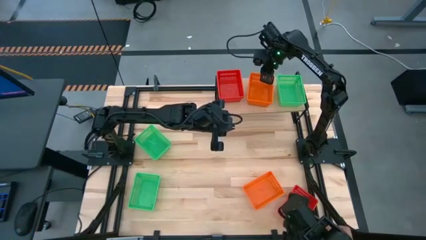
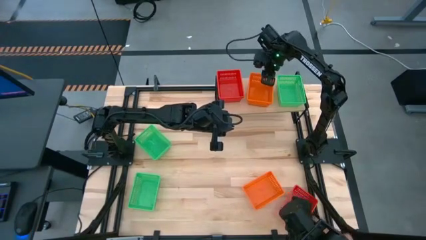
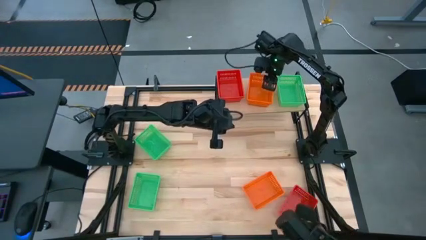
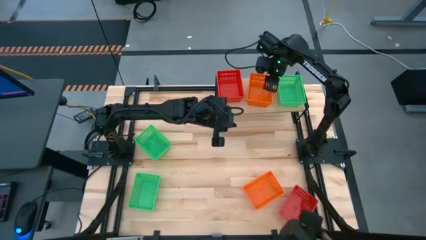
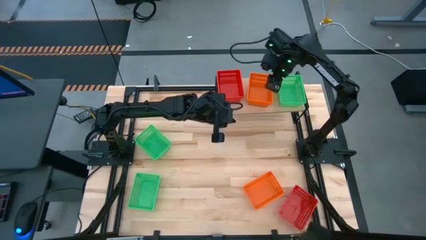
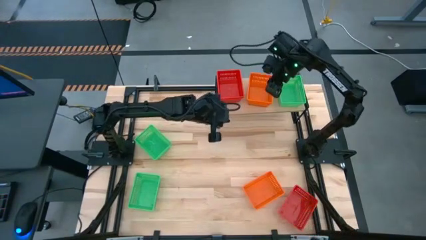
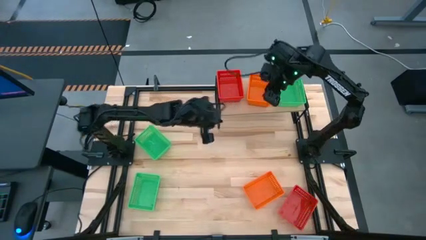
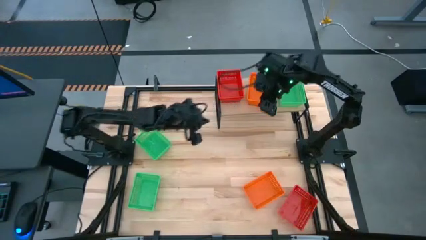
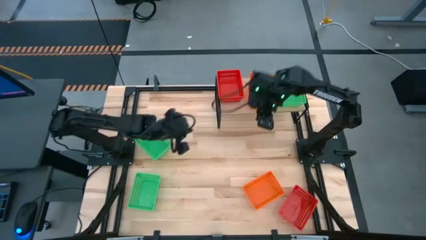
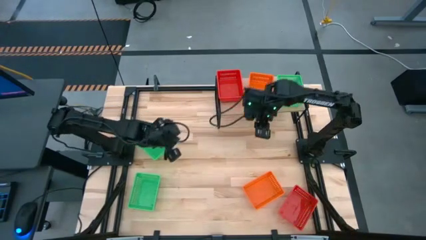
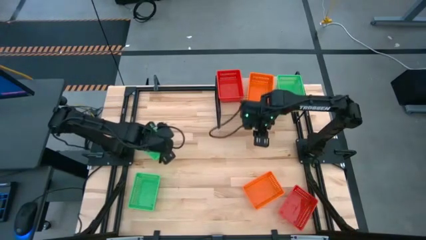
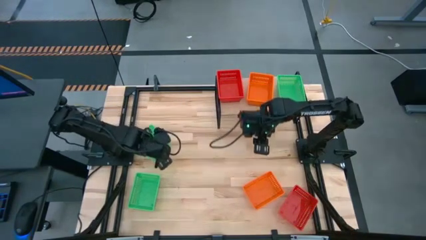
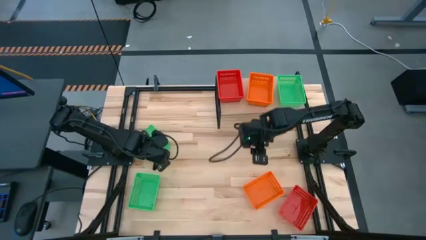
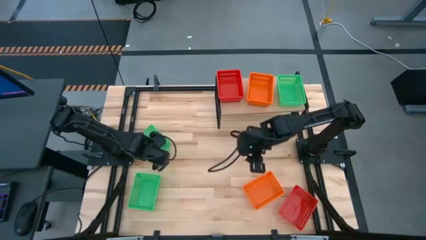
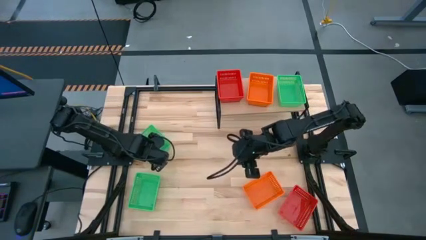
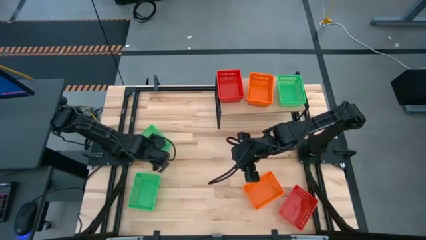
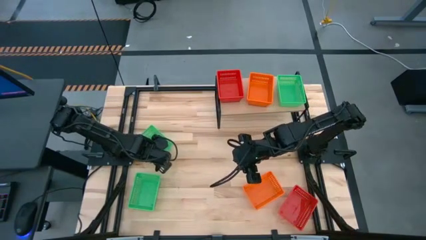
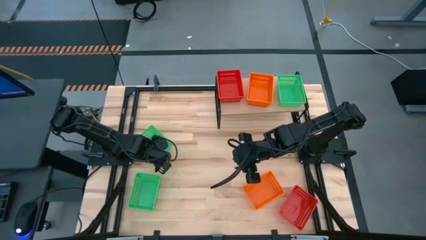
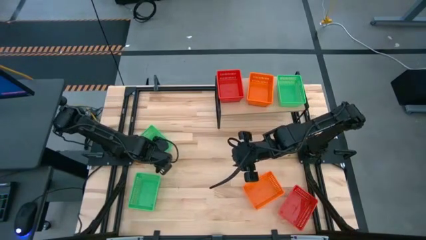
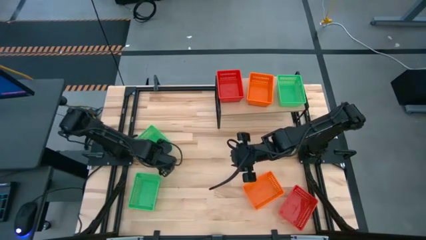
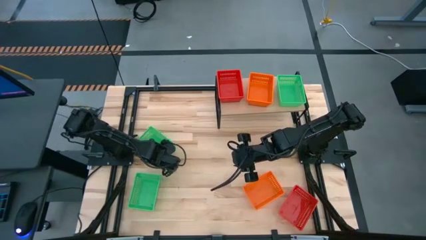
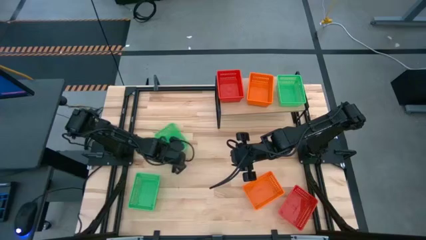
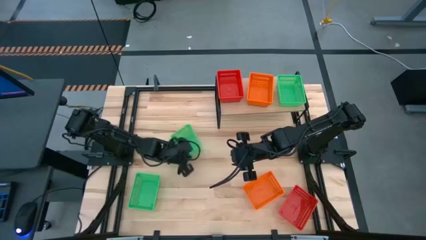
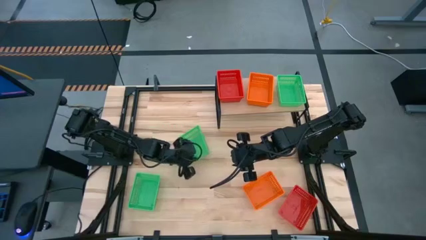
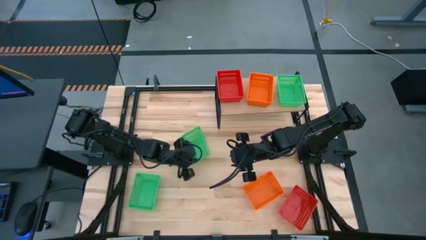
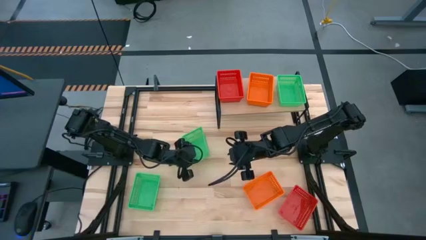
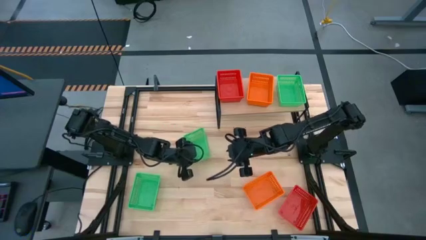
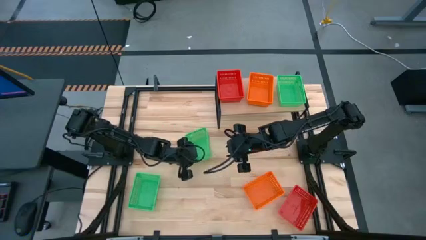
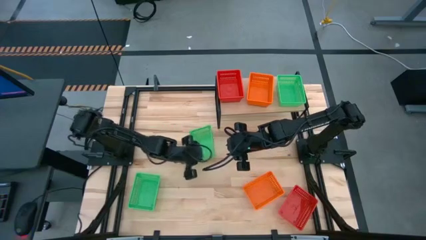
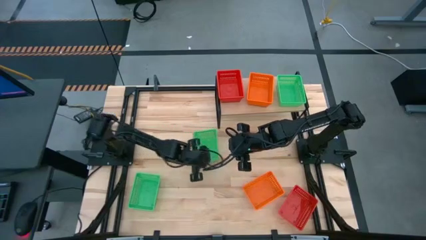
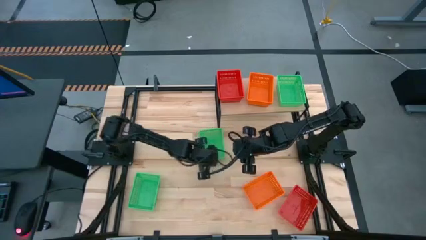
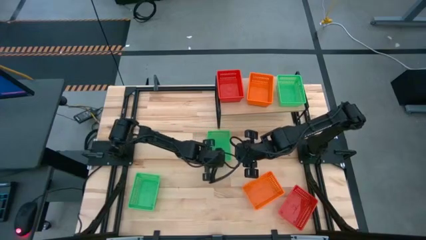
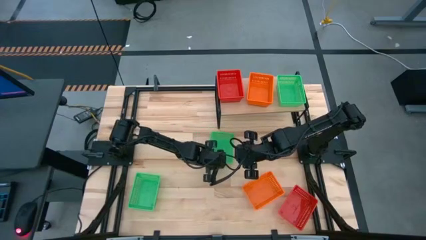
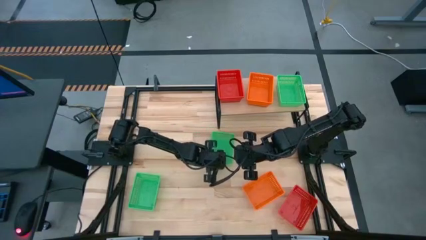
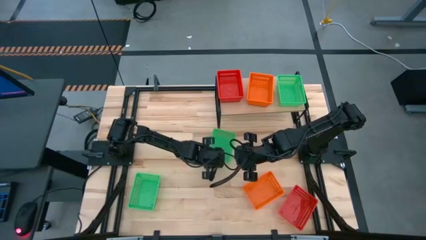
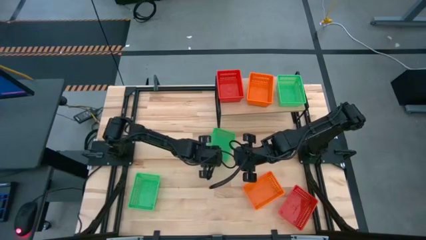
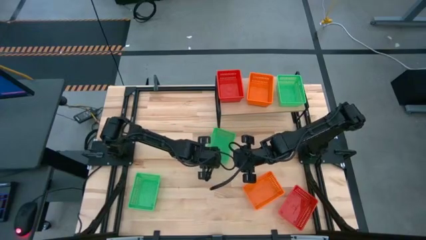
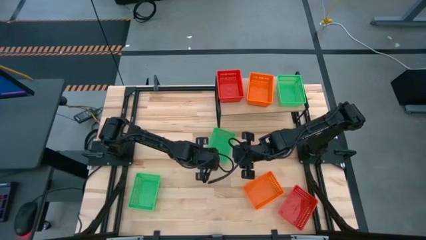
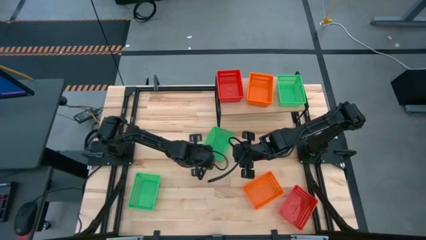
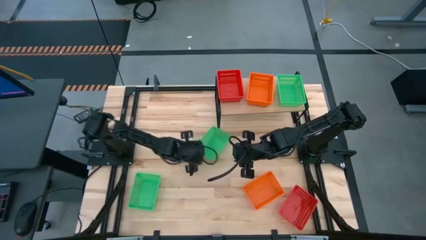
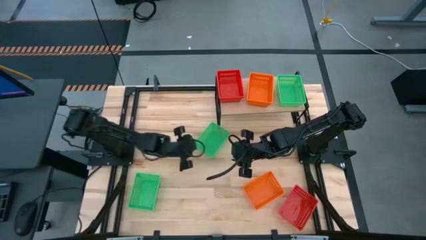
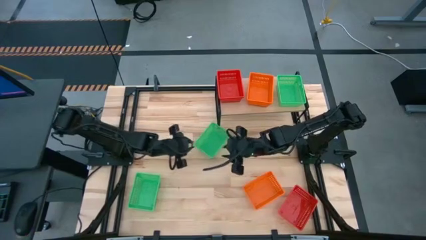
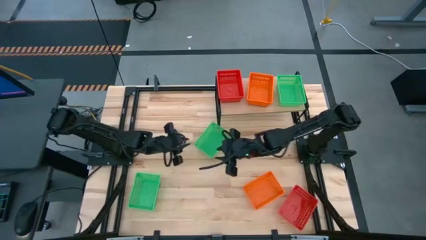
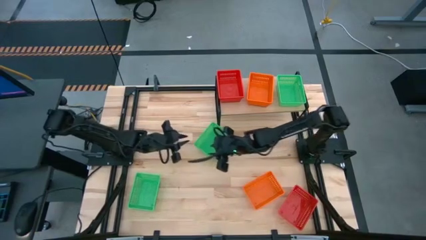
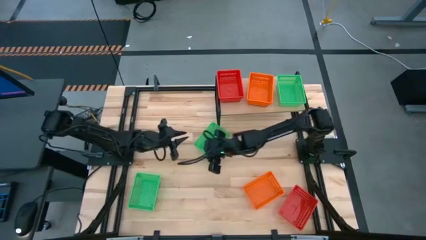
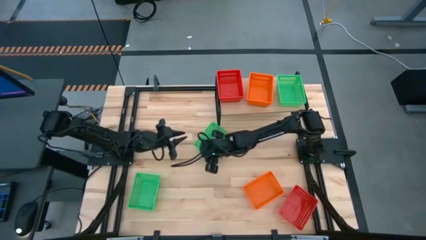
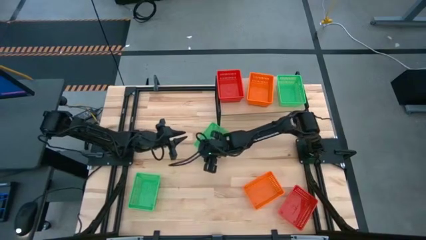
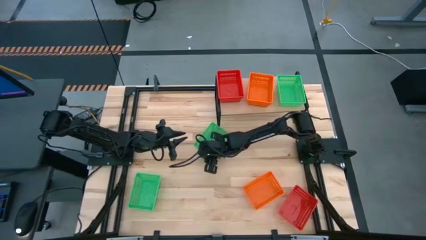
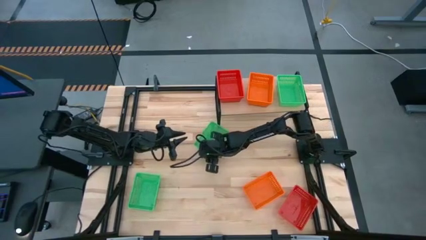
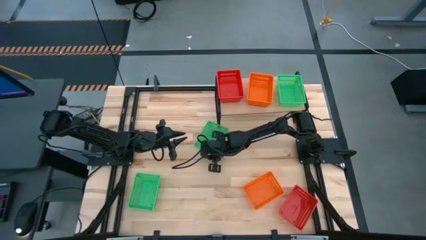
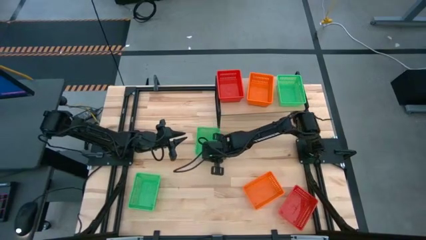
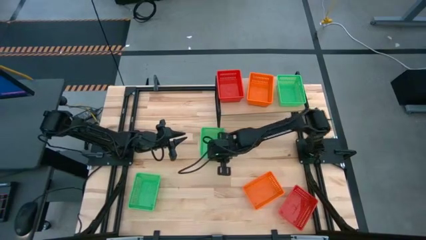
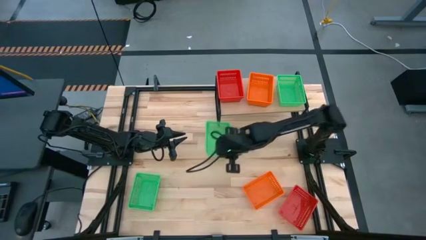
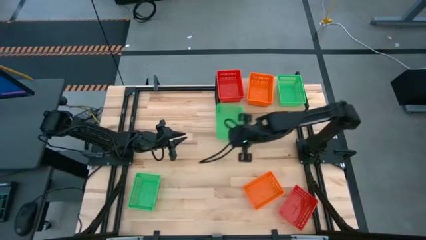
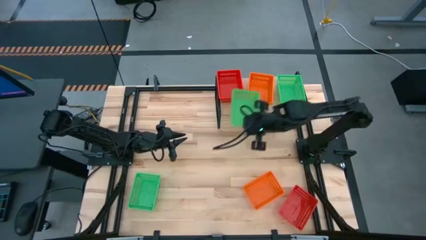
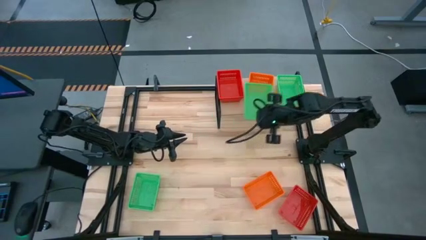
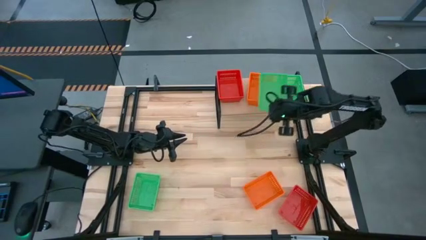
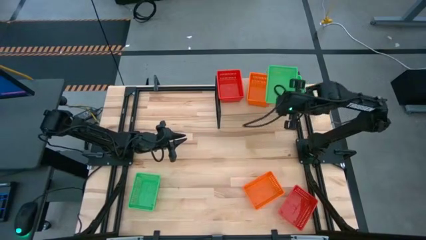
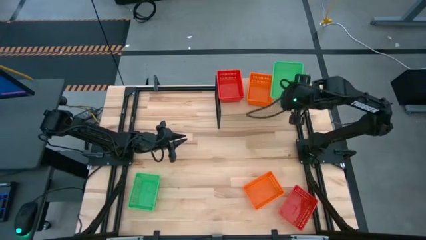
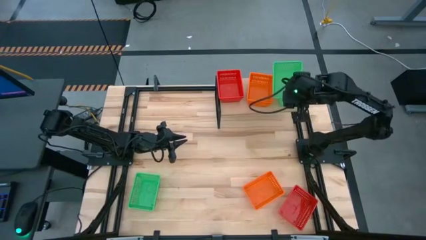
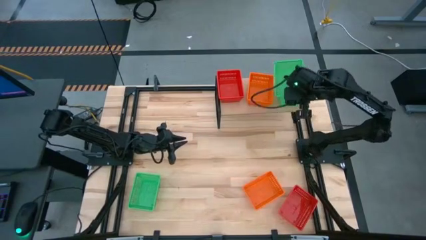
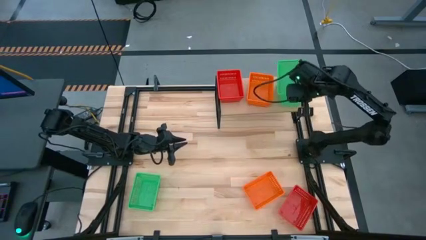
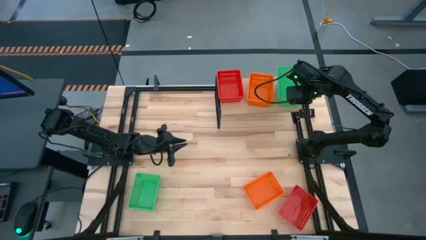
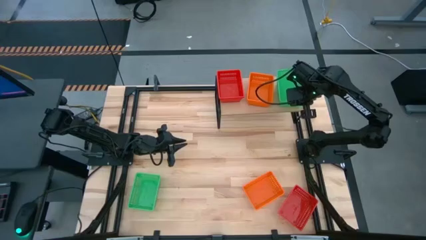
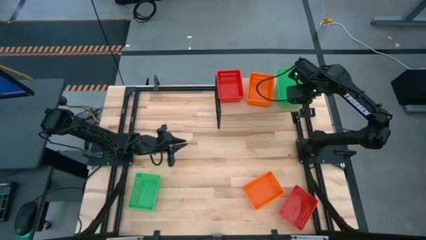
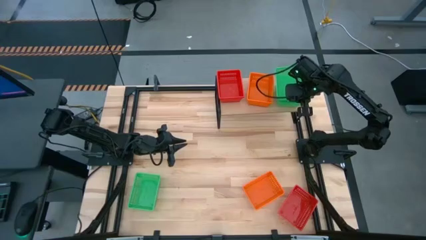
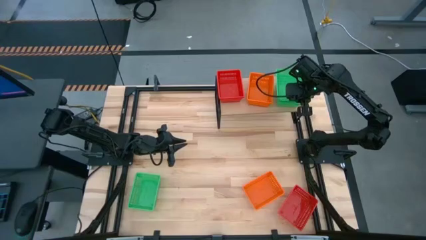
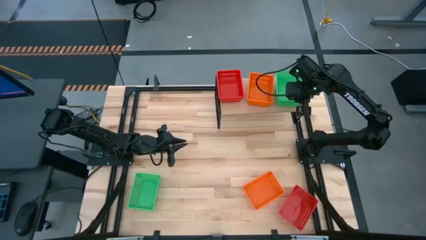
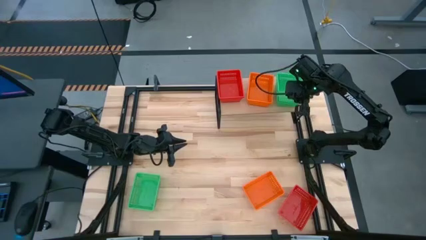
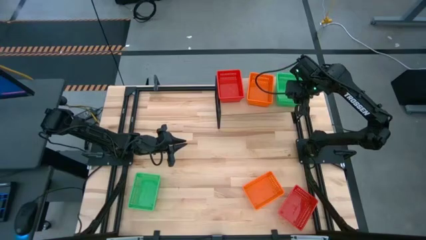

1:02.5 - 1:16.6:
Task: Stack baskets on shelf by color
Stack the top green bin on top of the green bin on the shelf
